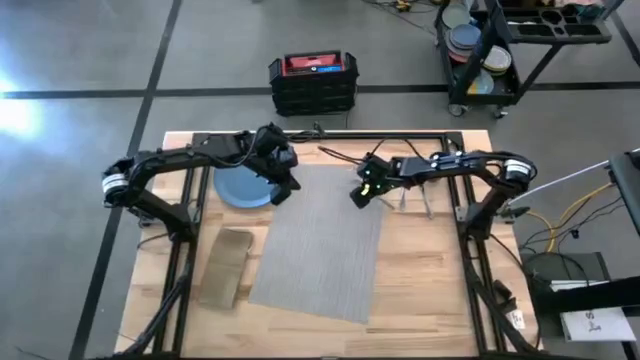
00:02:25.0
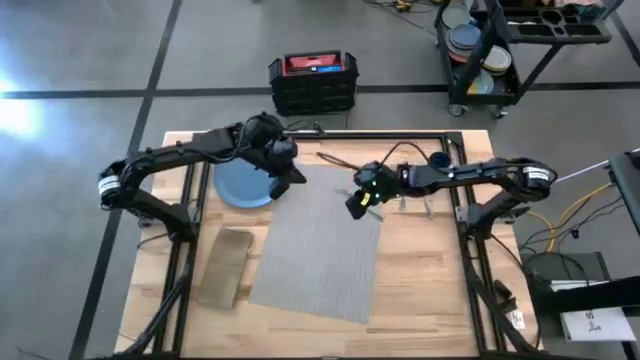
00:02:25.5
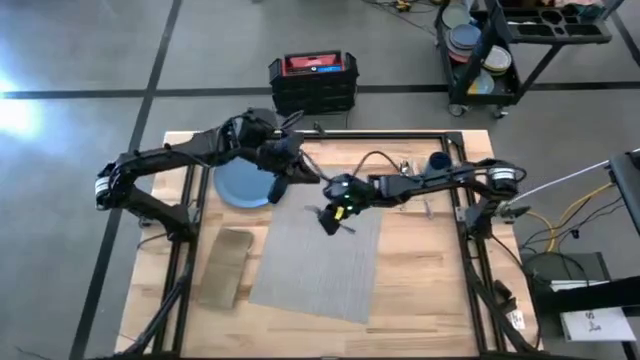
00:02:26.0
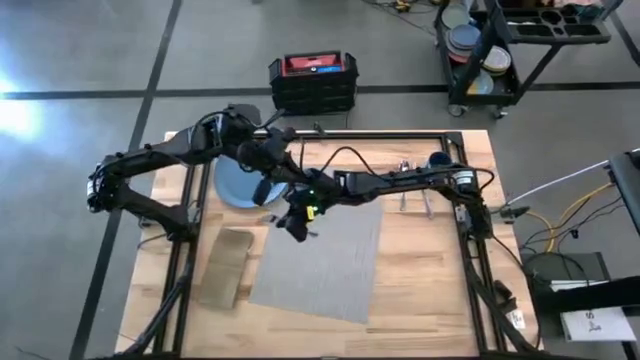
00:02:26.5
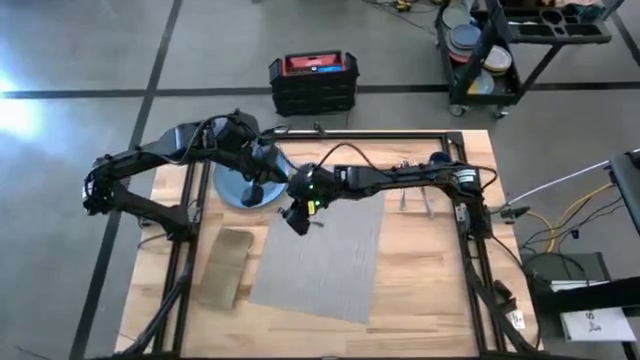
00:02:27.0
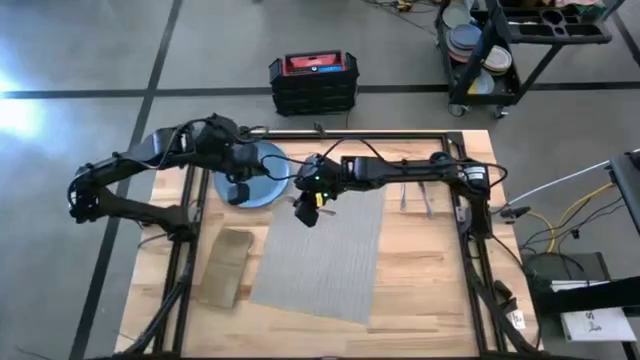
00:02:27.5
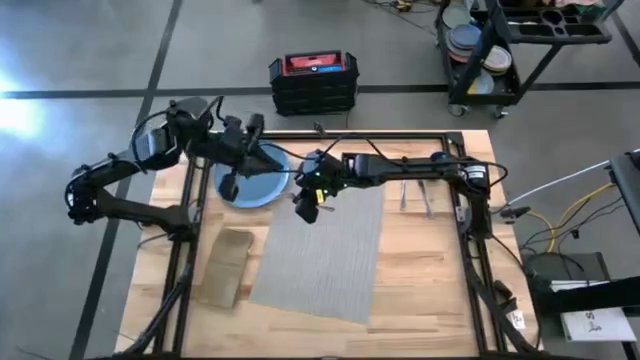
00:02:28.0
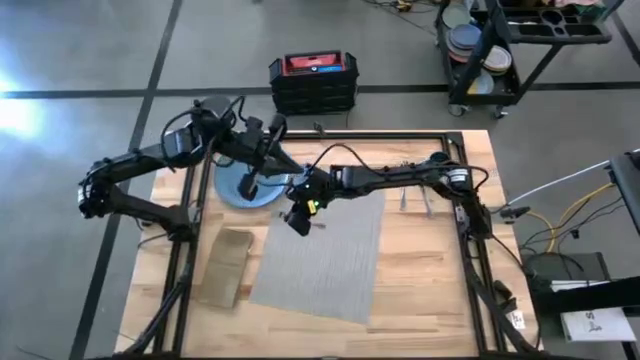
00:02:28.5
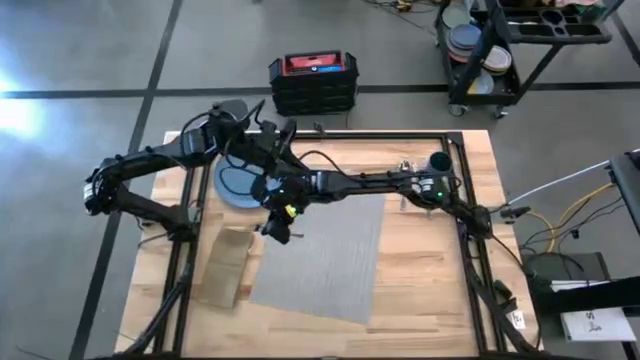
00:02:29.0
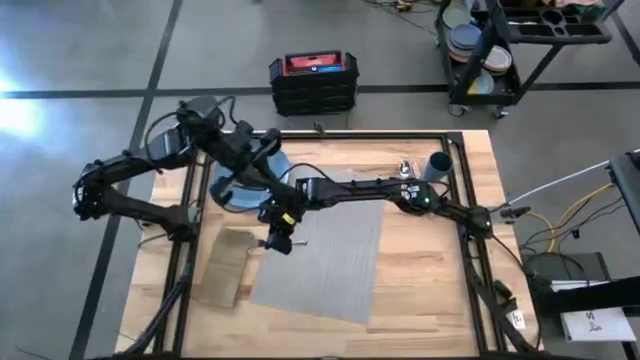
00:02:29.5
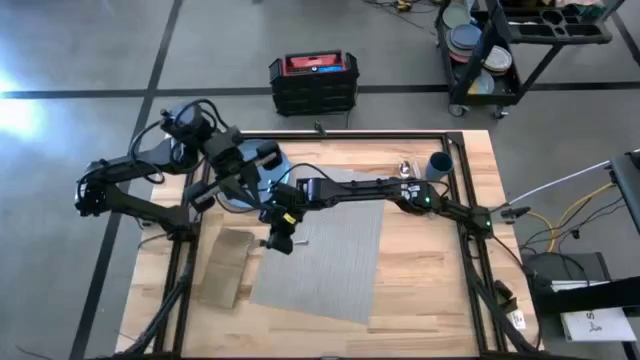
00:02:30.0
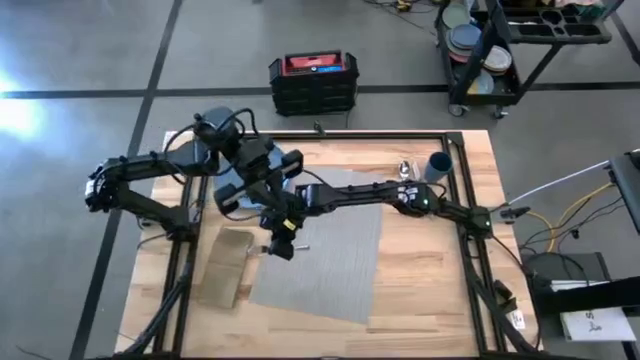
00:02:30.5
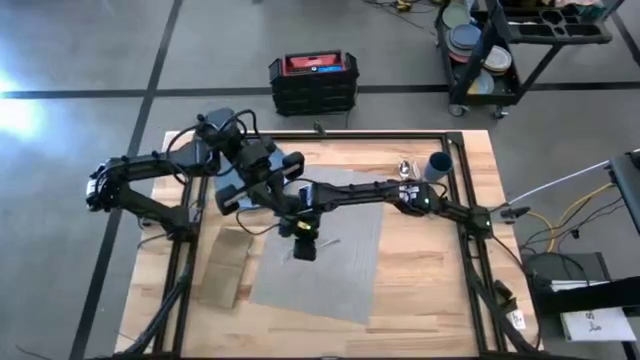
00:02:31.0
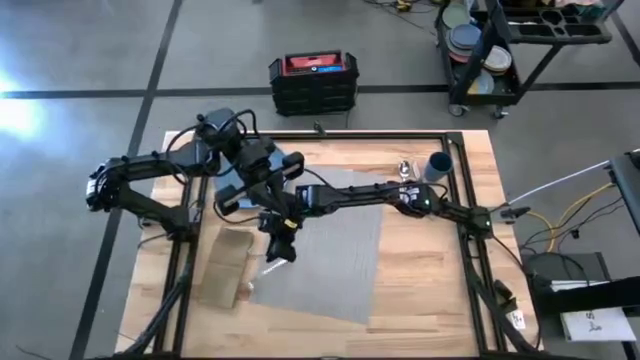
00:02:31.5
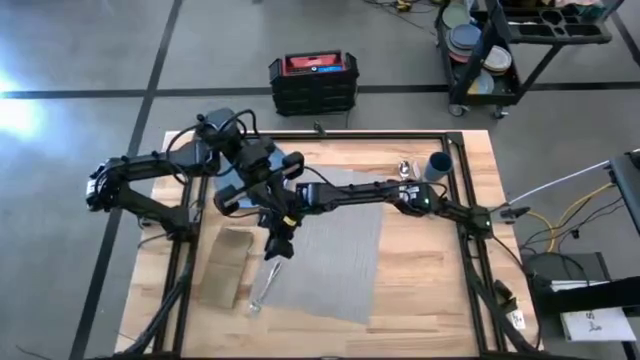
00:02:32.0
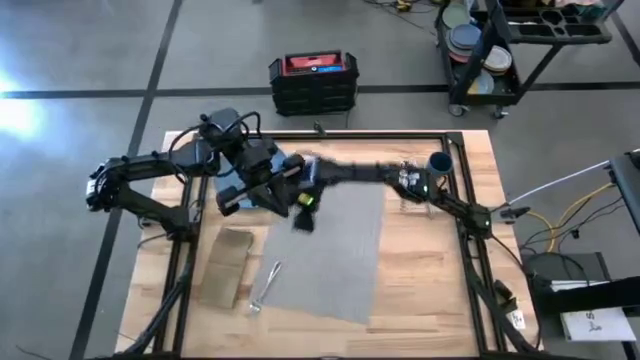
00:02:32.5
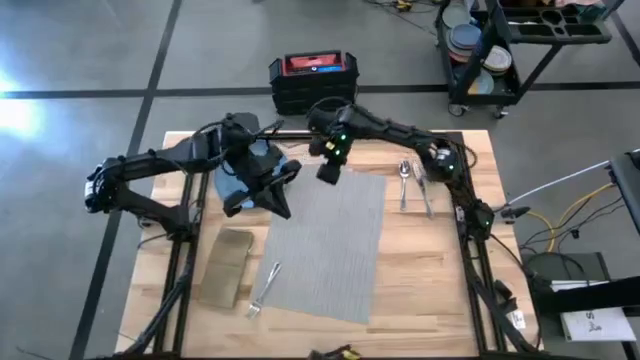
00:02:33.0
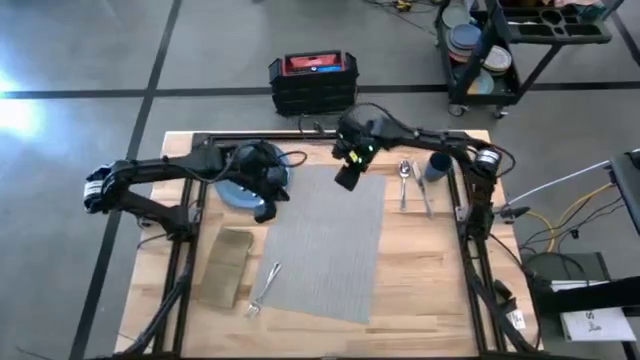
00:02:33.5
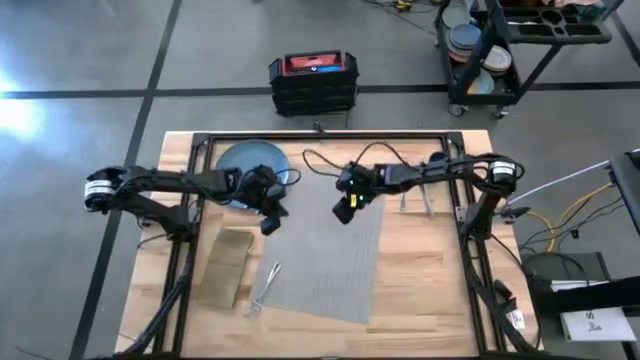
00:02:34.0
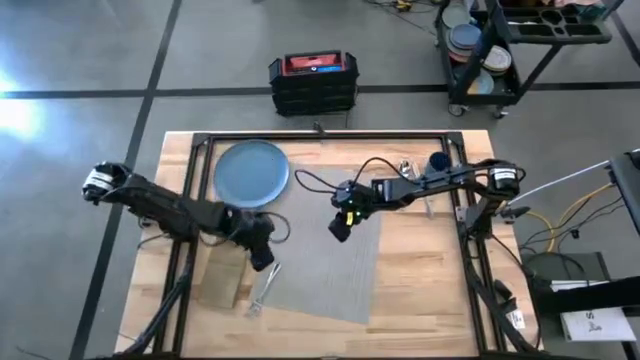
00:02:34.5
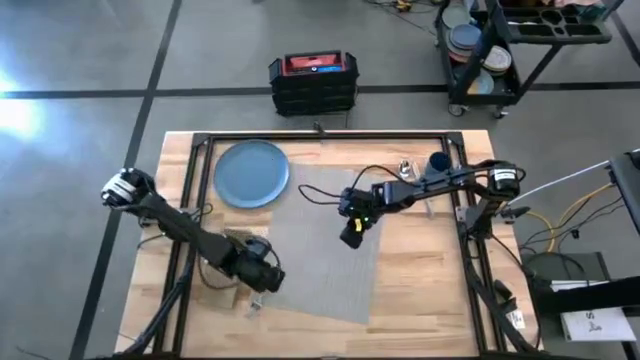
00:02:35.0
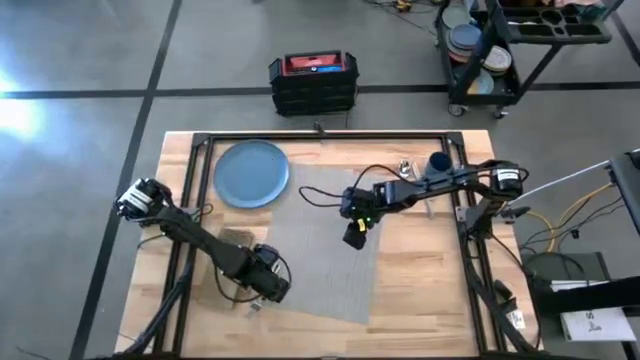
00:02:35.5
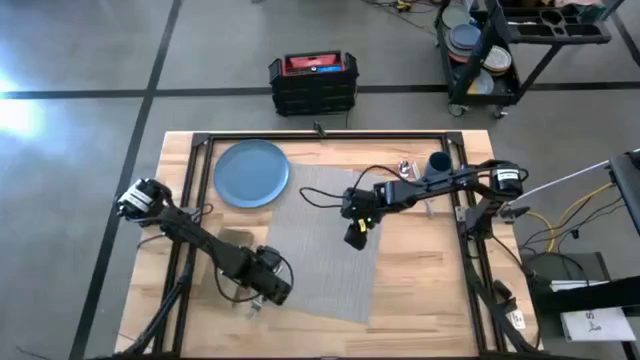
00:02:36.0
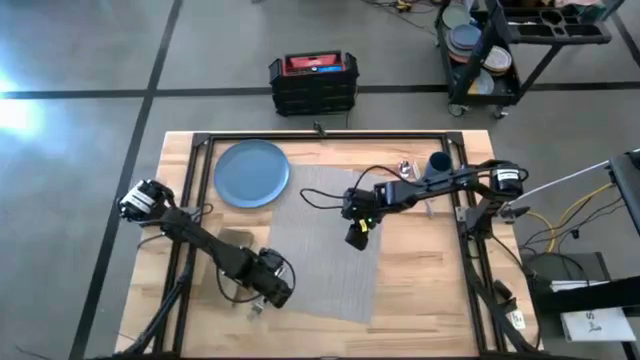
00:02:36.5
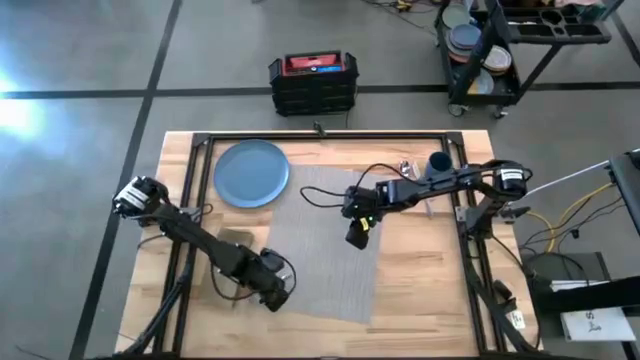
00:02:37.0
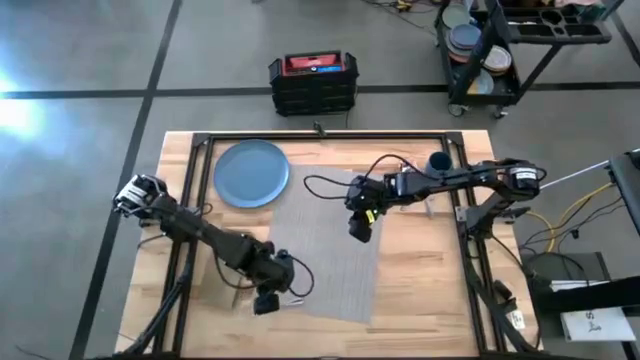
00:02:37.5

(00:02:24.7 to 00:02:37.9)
Task: Set table place
Put the silver fork on the brown table napkin

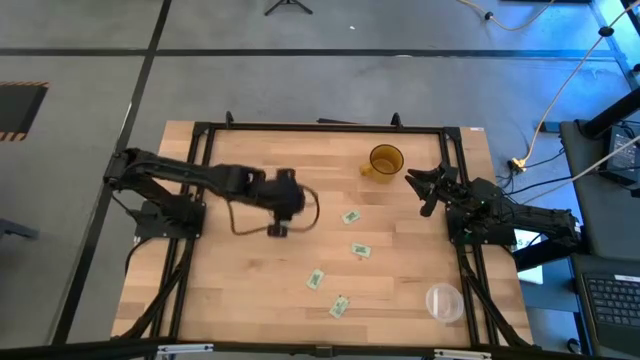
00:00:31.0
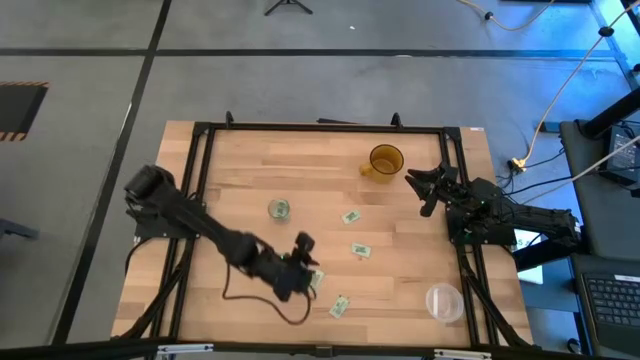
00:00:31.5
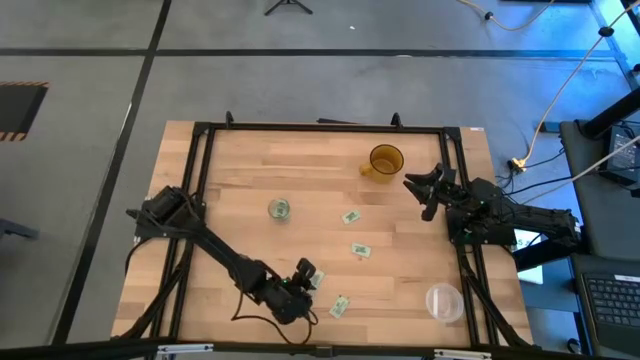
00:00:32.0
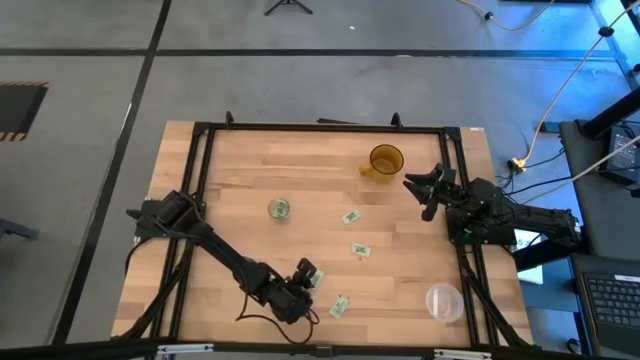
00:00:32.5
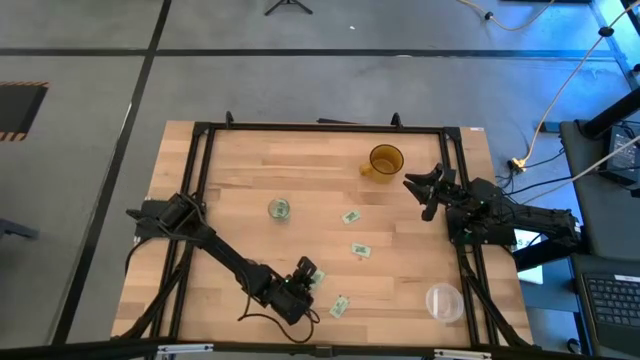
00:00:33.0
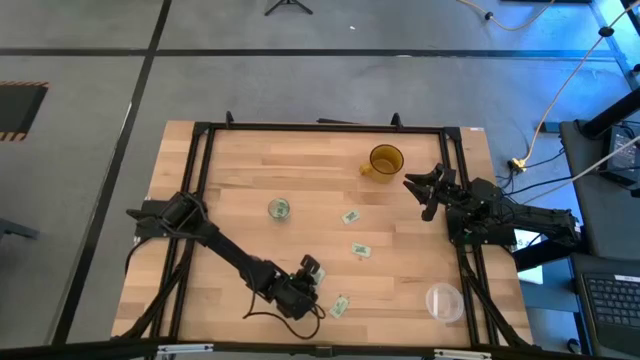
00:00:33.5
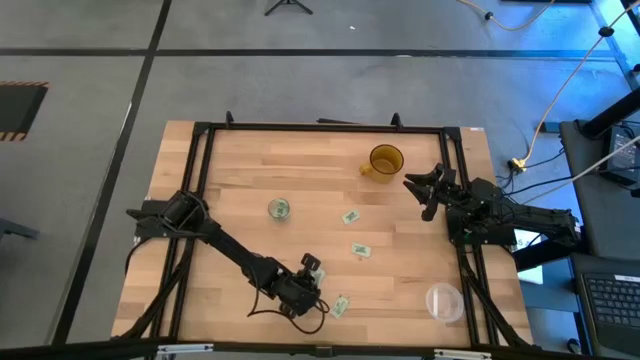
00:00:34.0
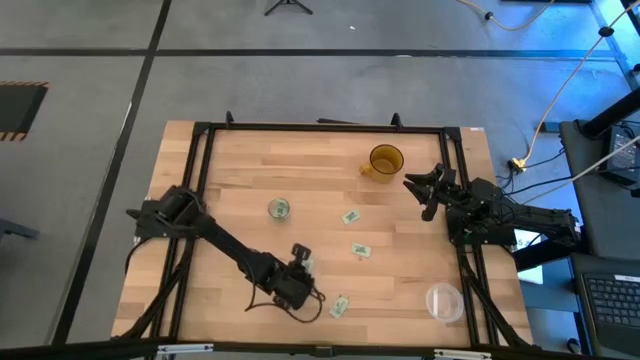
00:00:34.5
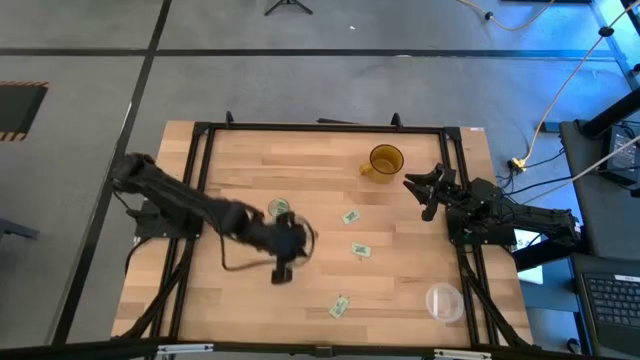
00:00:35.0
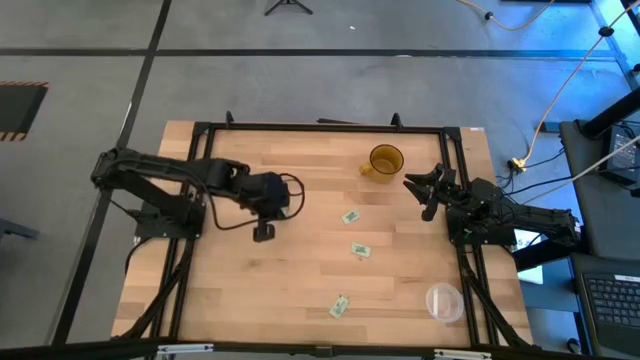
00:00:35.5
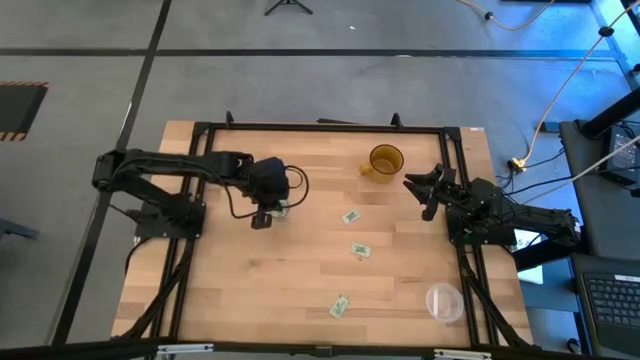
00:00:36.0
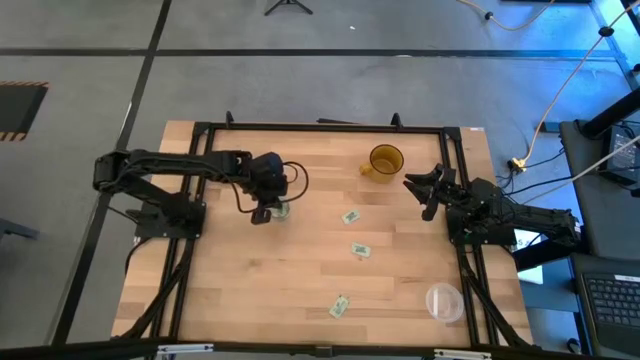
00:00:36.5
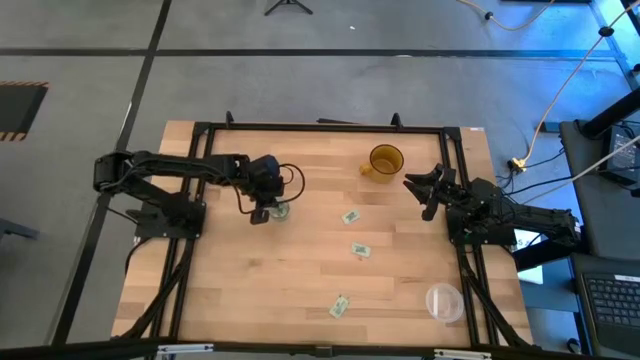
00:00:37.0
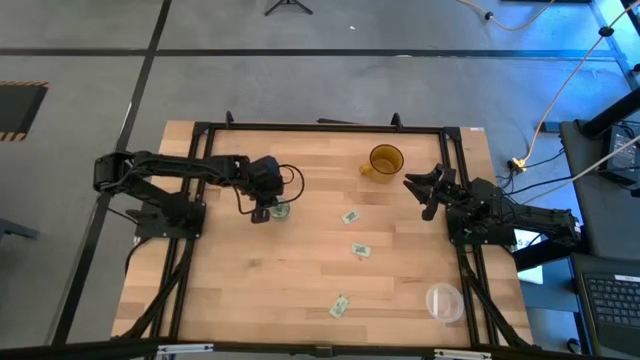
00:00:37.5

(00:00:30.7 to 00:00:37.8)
Task: Pick and place Stevia / Truvia into bins
Put the stevia packet into the transparent container

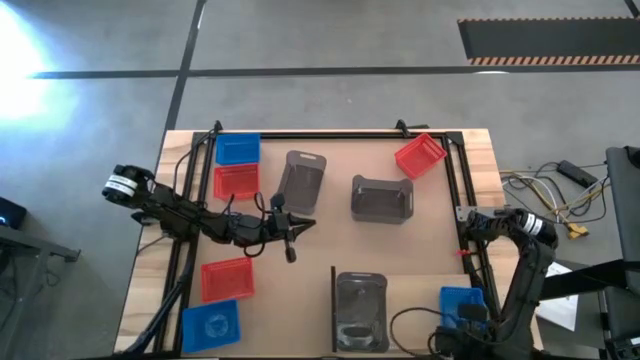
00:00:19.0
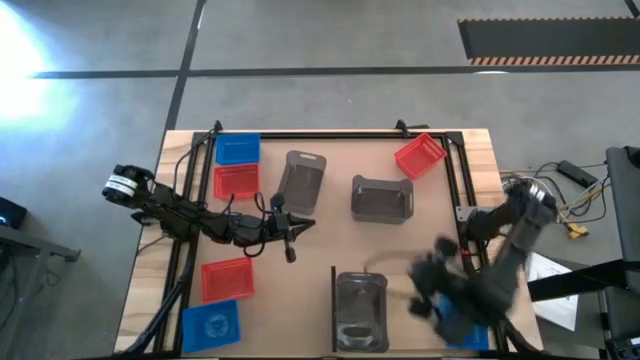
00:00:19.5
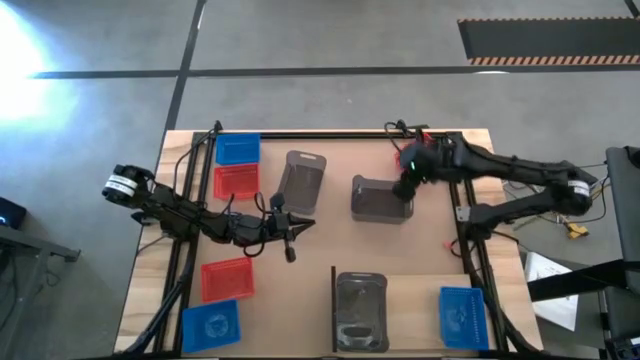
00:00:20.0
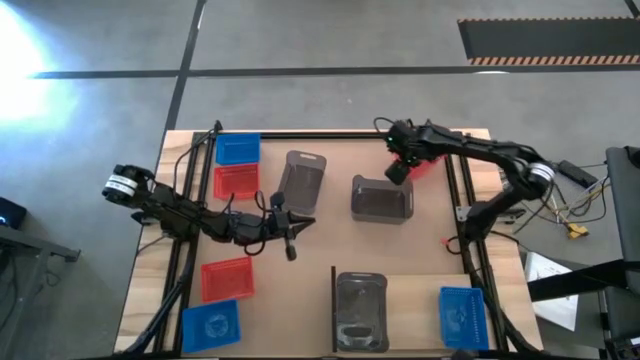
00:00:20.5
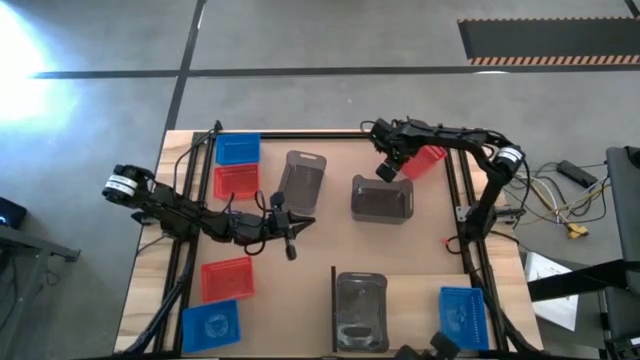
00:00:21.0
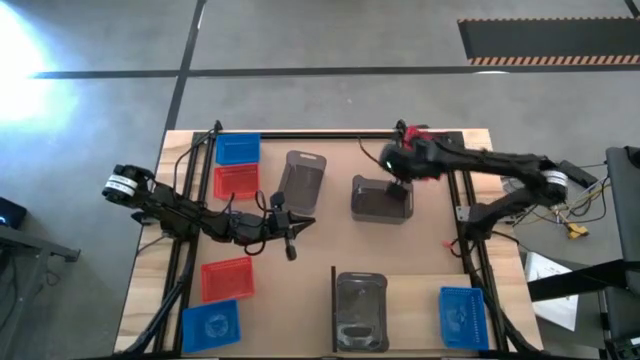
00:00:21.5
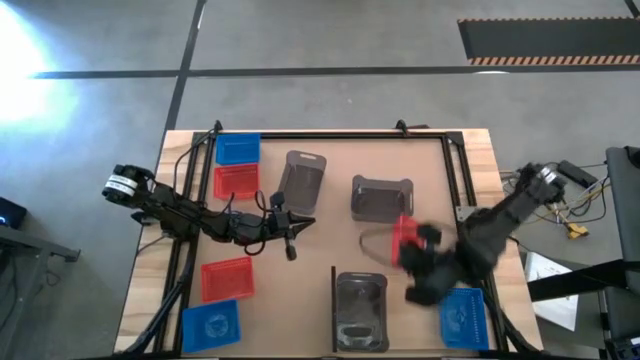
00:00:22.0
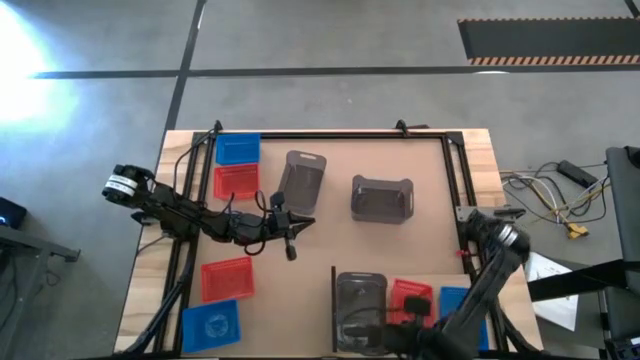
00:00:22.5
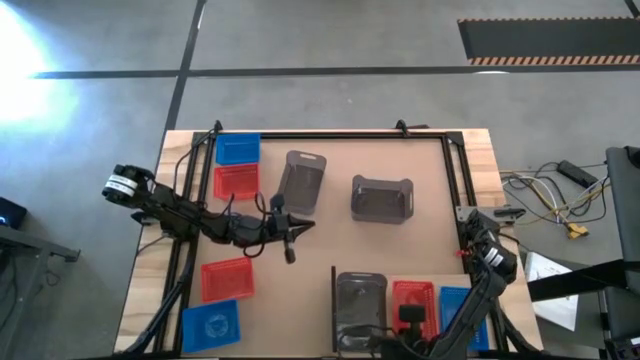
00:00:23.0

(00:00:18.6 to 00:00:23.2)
Task: Stack baskets on shelf by color
Put the top right red bin on the shelf
